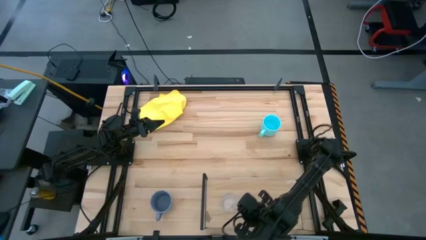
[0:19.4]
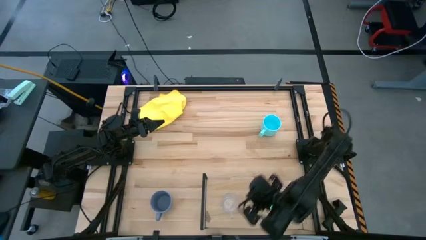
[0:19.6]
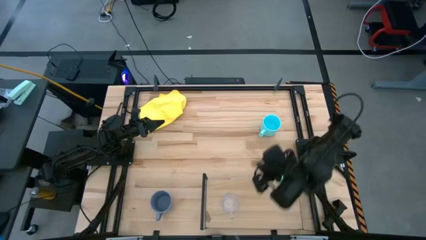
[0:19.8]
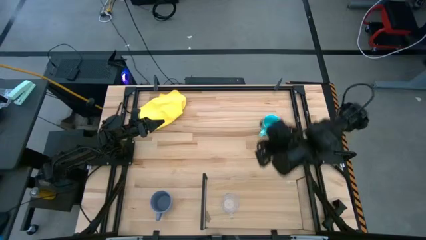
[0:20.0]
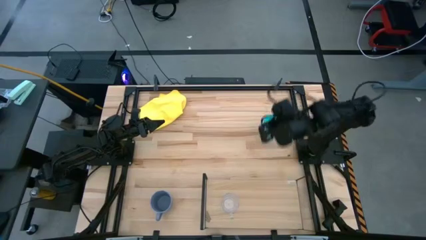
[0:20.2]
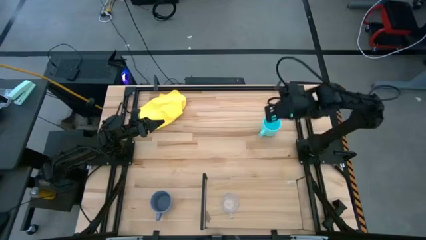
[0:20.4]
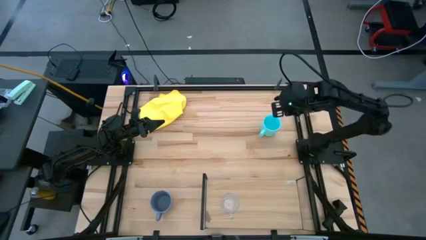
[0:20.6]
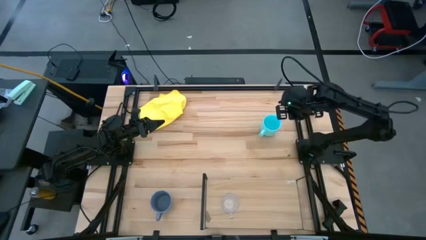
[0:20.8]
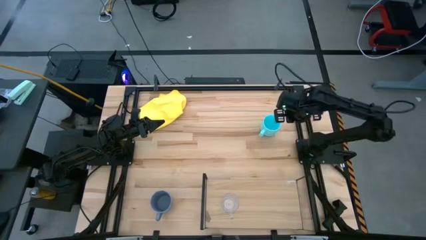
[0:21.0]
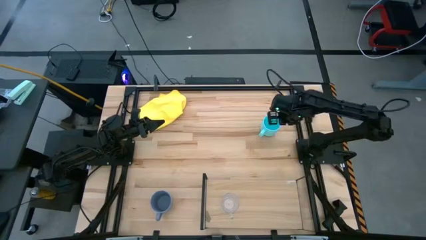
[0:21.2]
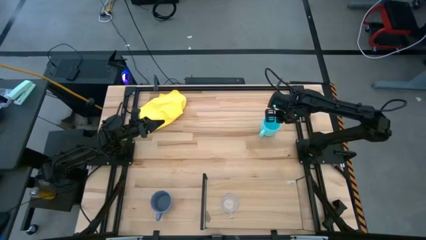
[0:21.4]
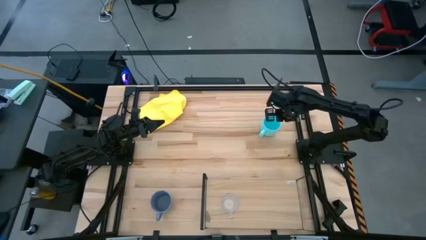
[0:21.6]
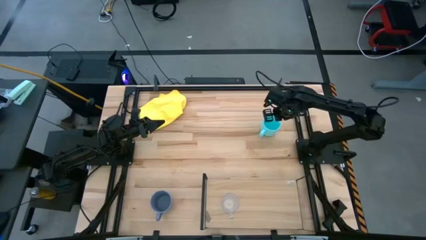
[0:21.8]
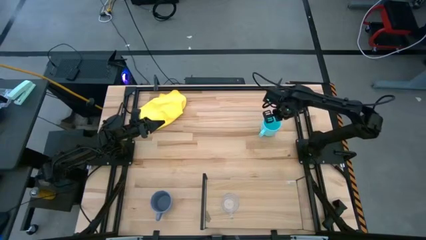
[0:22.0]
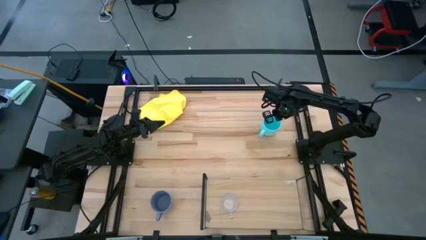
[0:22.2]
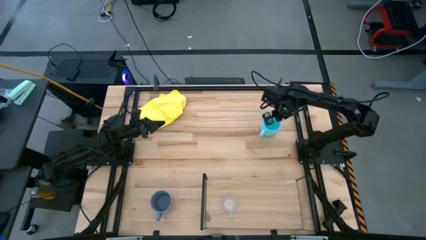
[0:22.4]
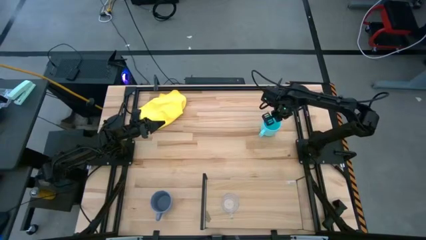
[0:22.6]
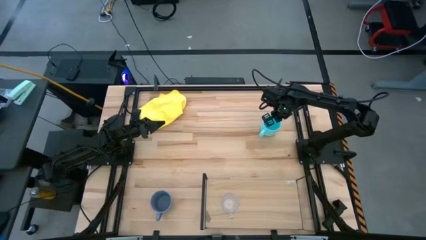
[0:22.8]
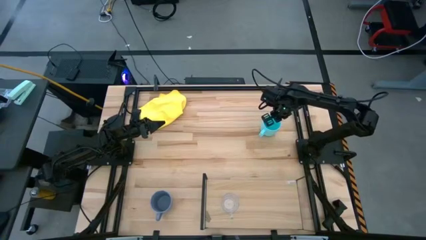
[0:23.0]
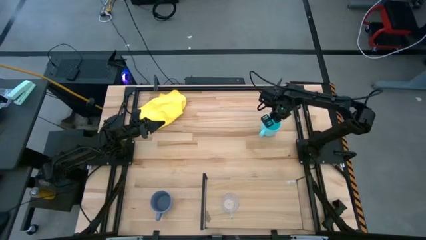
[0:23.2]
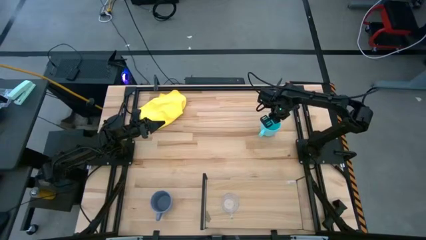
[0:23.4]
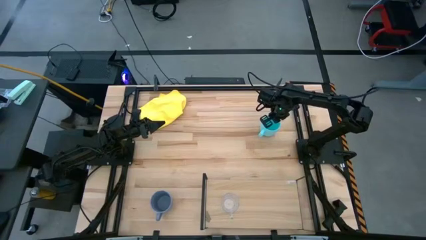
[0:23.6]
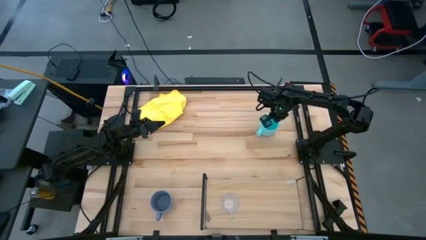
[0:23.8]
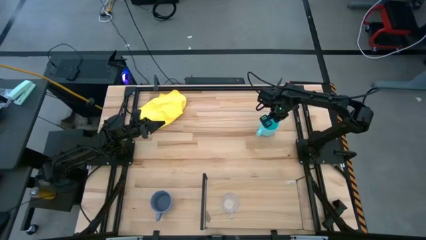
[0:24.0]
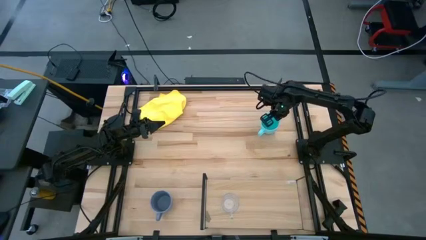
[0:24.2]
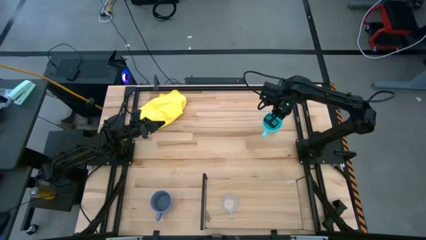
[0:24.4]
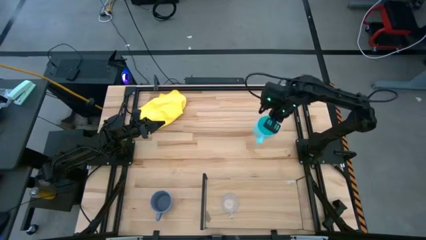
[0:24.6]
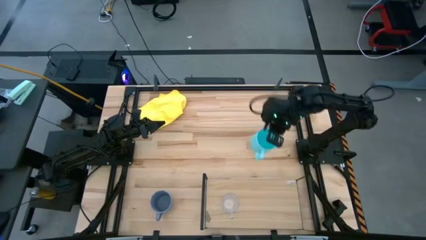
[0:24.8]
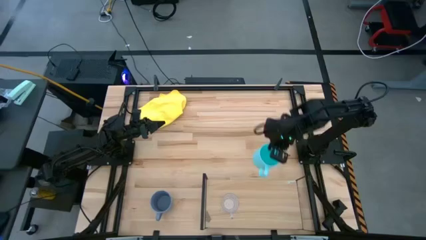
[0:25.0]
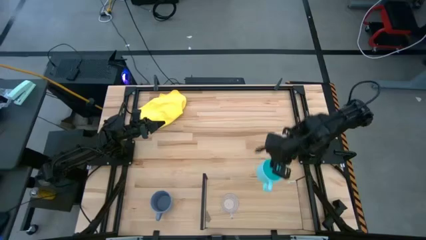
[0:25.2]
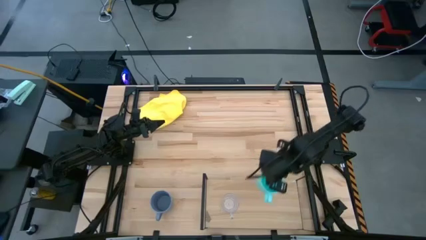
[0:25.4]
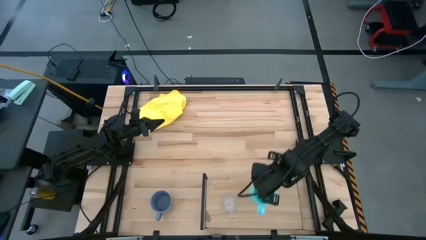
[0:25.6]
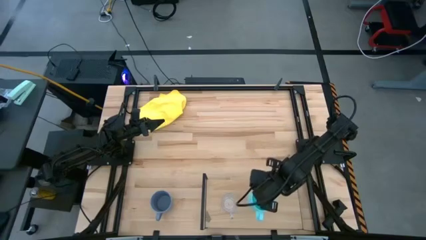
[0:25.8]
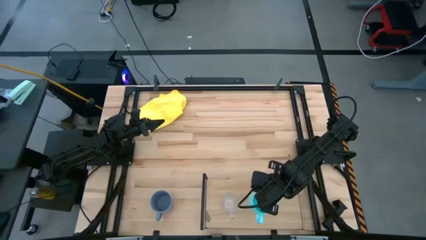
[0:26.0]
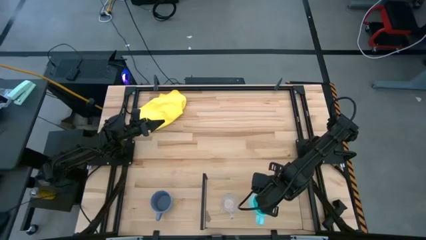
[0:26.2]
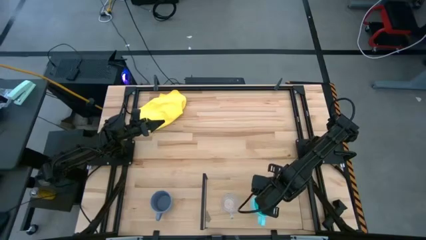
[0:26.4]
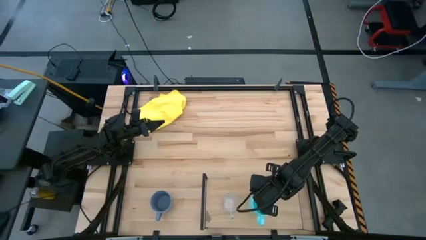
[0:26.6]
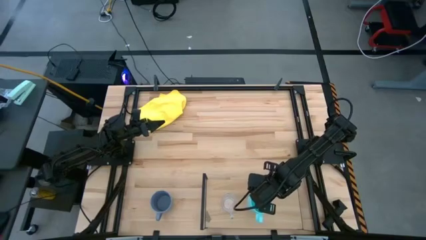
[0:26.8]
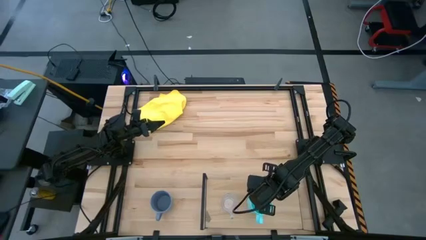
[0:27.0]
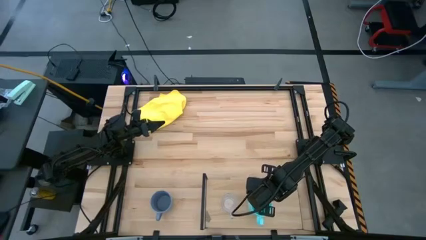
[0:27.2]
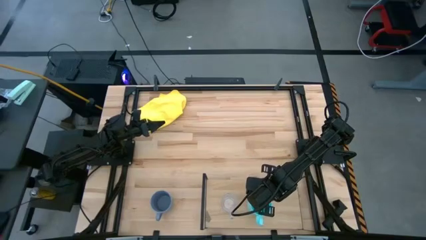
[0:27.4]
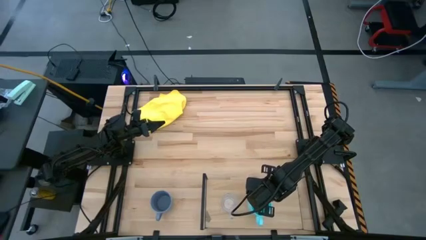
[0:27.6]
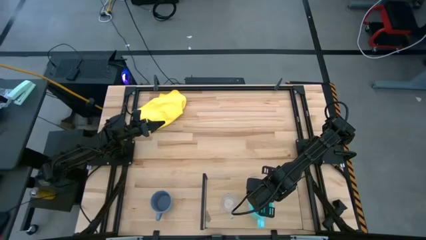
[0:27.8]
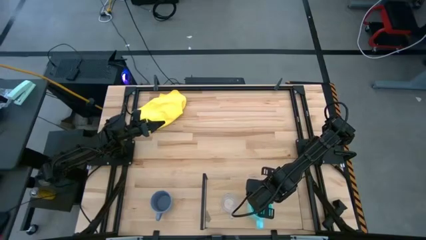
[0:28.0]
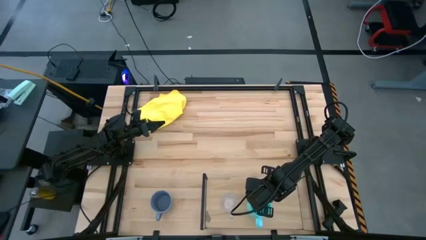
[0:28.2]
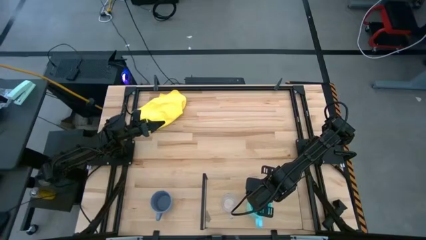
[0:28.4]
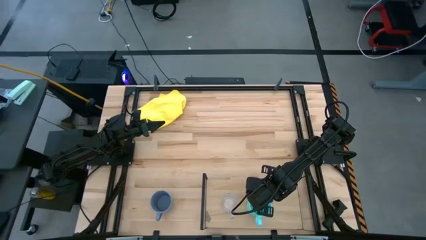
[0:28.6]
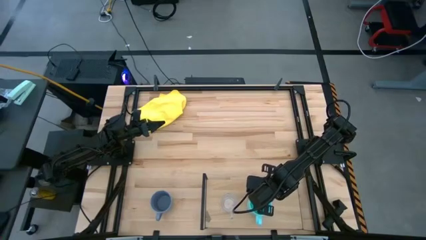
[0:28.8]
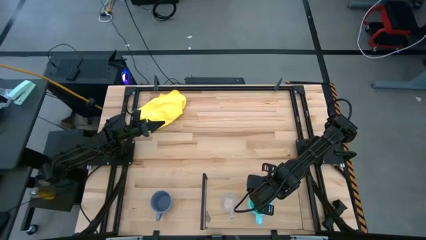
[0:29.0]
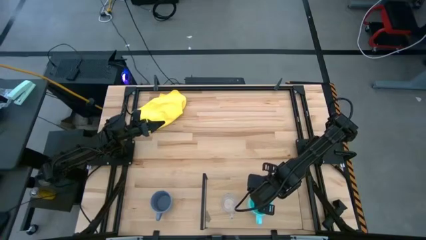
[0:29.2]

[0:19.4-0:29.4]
Task: Stack small to large cups/mugs on shelf
Put the blue mug on the shelf
